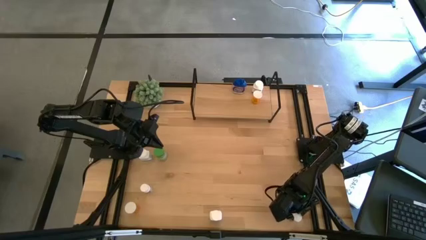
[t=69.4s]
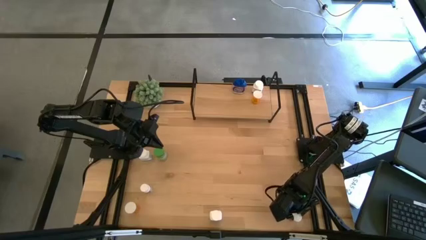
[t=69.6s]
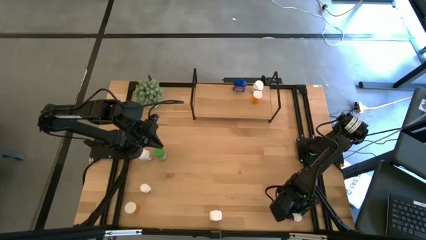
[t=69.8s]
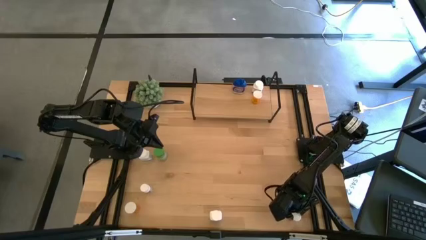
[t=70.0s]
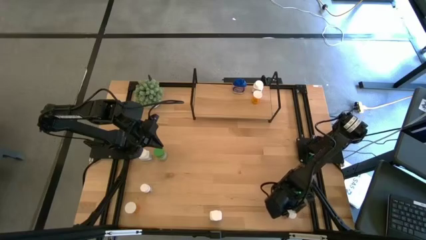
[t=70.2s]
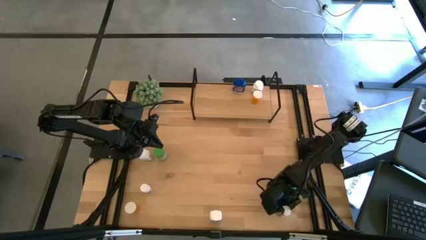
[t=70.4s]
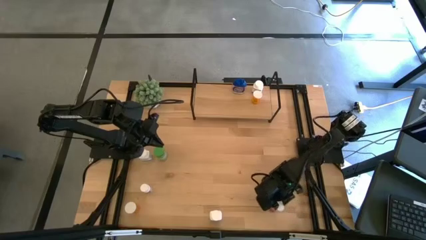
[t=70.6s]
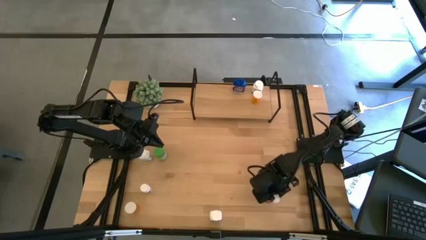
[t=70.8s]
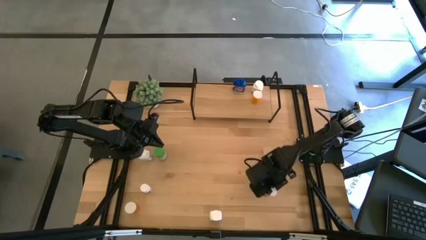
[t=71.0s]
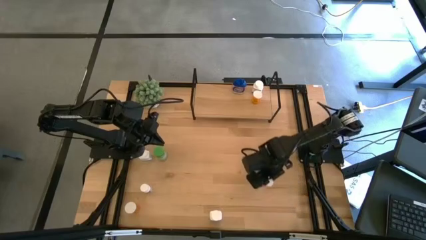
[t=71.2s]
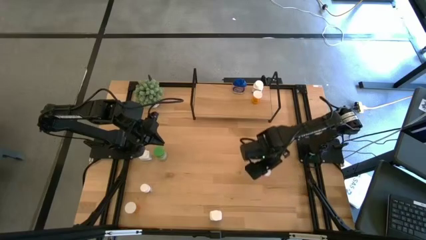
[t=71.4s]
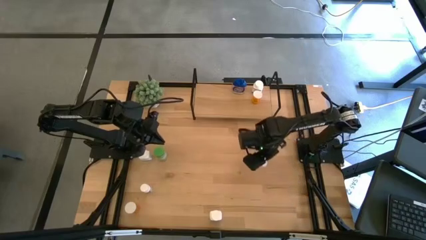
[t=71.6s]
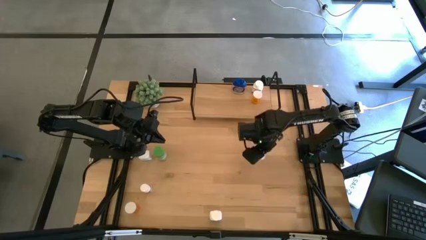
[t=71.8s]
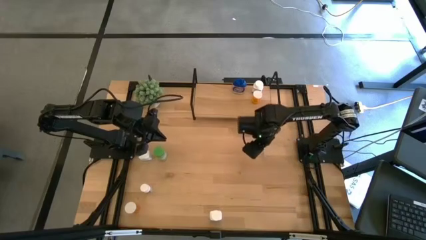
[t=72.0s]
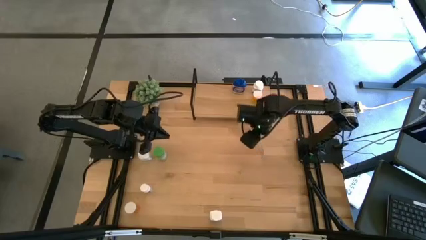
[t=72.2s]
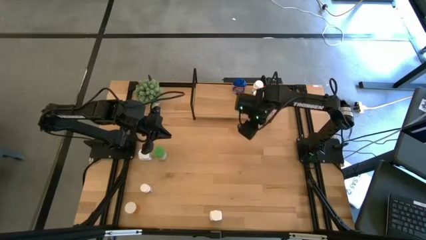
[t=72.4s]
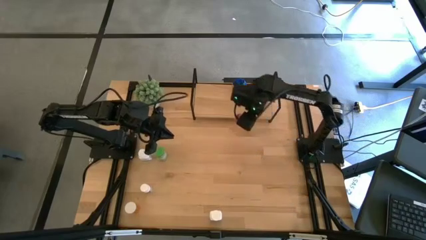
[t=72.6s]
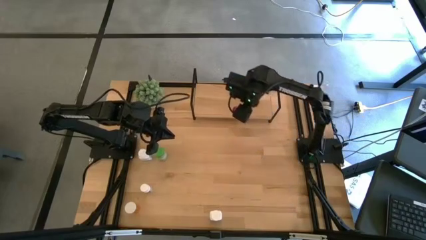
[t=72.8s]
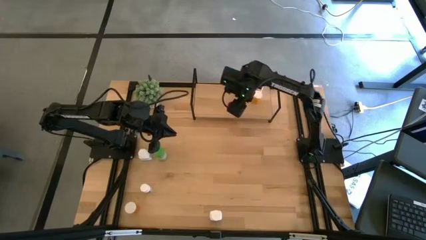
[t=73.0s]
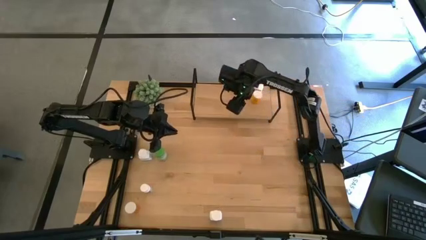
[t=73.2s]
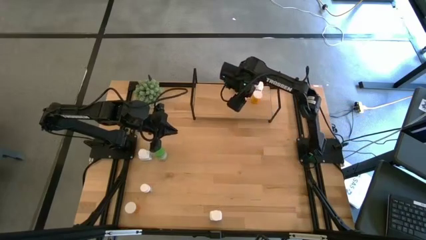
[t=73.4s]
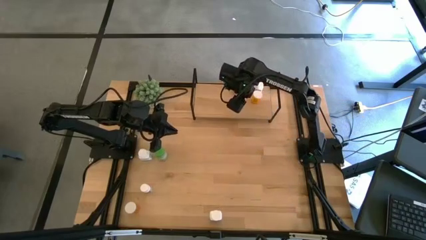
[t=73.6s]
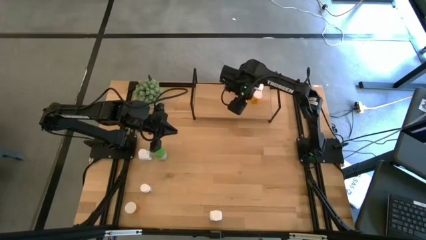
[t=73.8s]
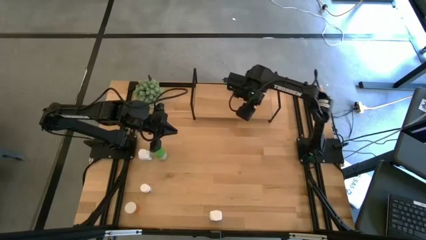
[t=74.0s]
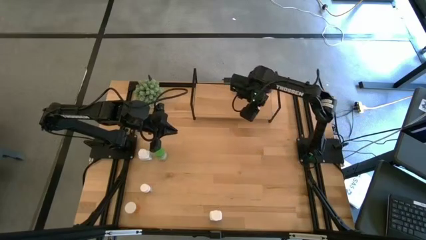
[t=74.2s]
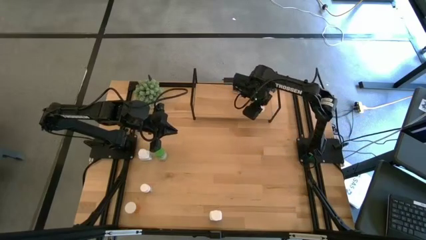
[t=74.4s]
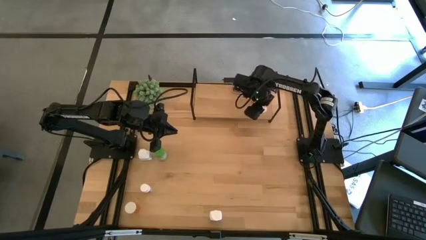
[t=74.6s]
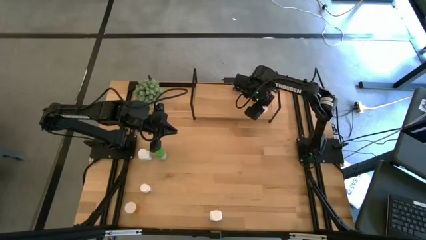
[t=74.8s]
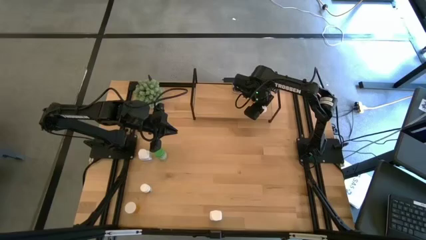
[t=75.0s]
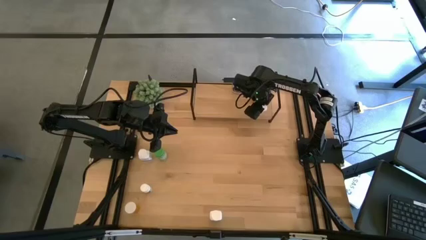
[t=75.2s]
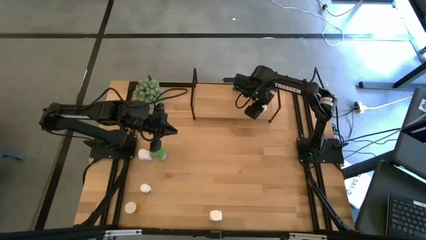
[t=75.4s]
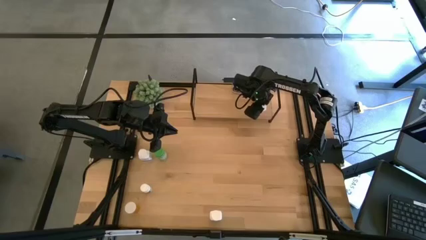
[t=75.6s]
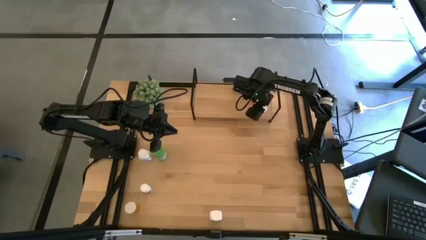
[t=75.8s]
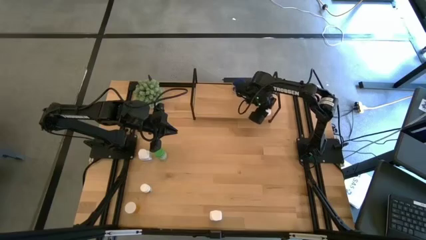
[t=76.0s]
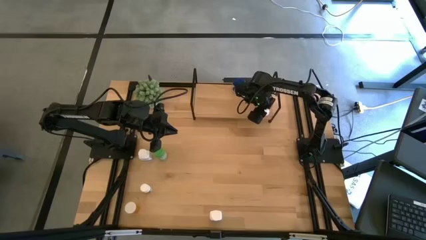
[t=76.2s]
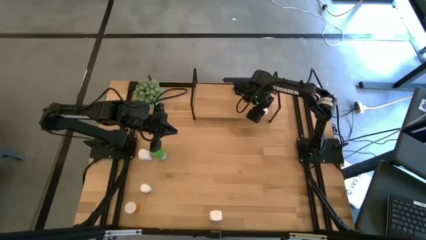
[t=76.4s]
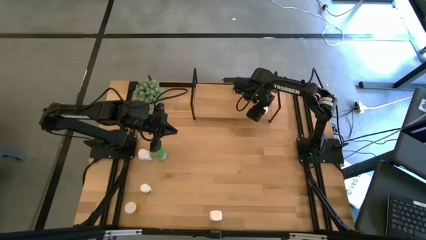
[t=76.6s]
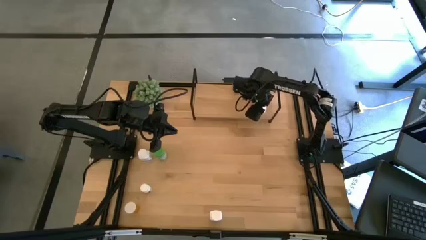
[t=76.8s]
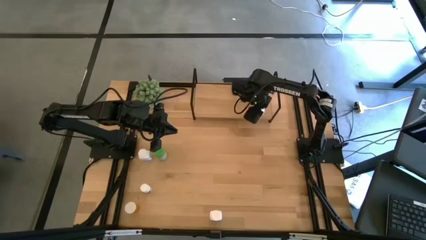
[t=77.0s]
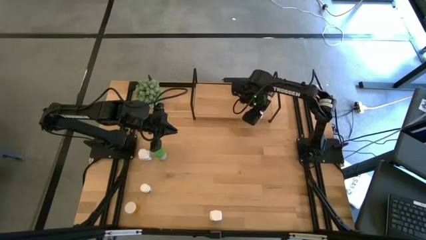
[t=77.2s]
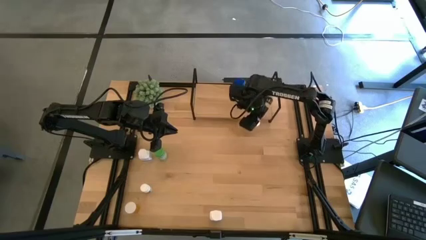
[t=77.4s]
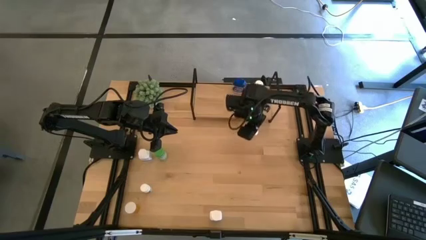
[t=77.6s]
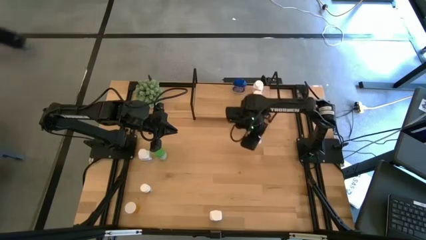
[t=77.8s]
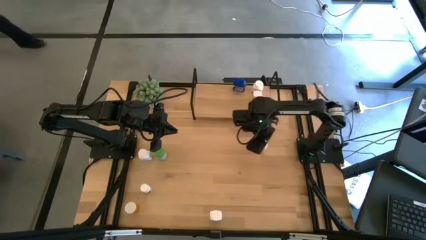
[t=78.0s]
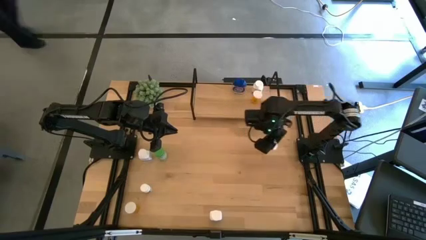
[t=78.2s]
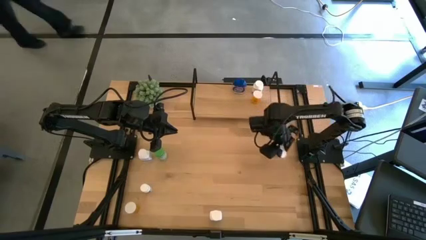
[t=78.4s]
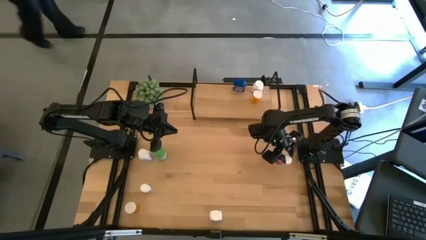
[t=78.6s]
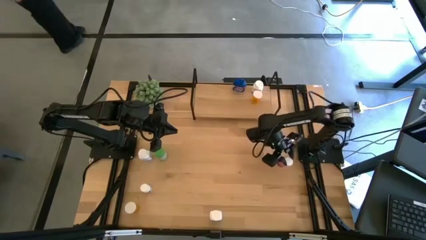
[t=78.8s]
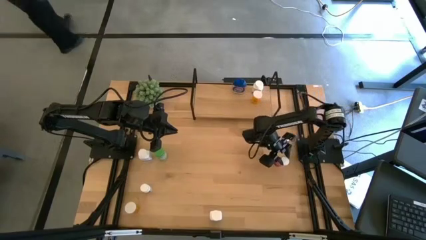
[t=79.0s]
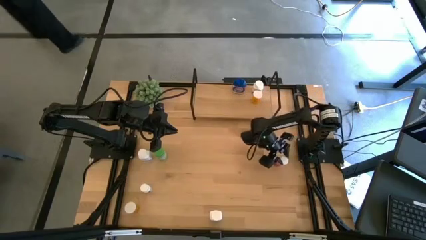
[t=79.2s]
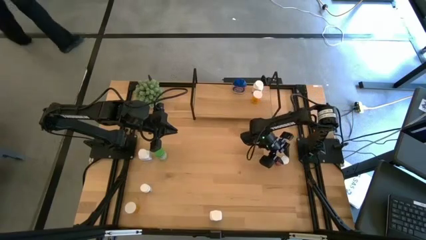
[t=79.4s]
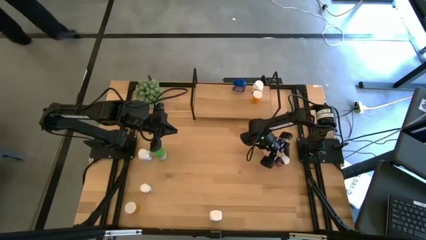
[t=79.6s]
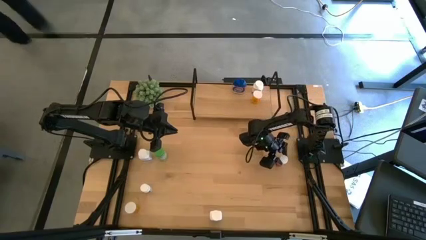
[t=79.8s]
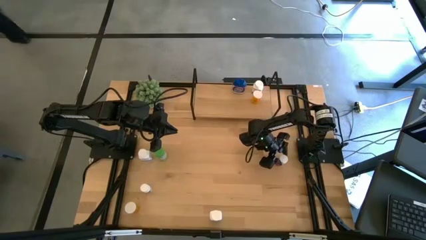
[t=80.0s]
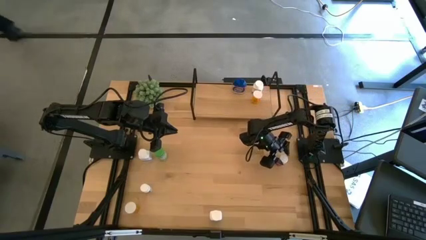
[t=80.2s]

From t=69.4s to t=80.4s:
Task: Pick and place medicine bottles onto shelf by color
Put the pink pill bottle on the shelf

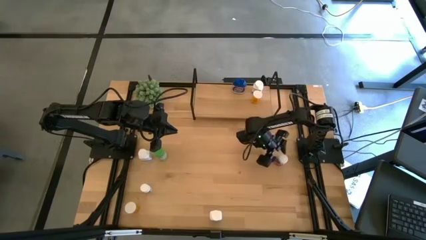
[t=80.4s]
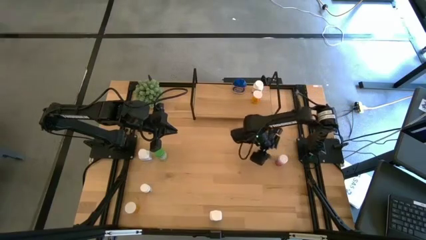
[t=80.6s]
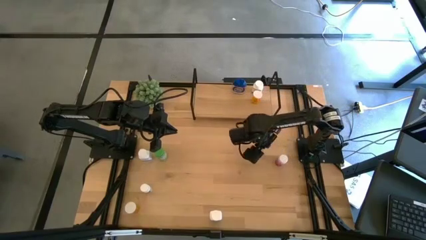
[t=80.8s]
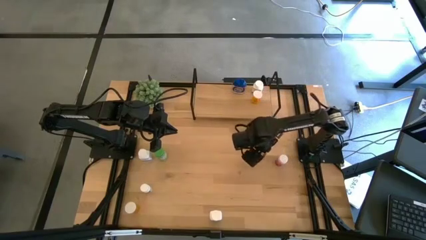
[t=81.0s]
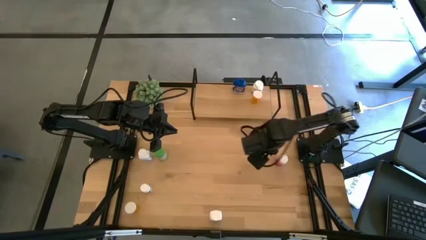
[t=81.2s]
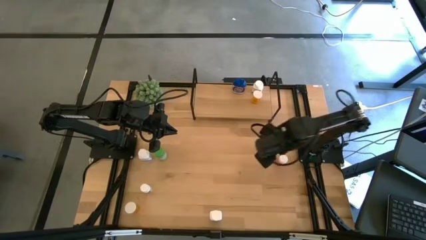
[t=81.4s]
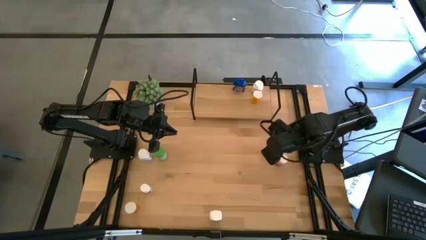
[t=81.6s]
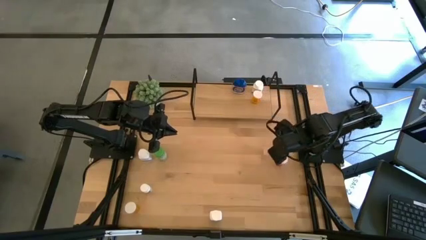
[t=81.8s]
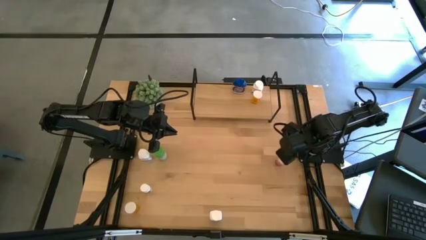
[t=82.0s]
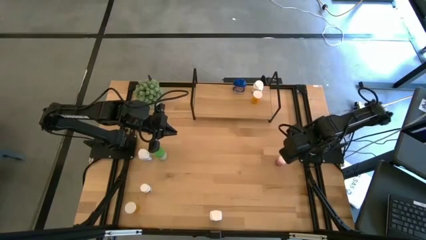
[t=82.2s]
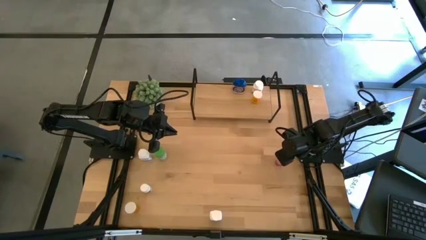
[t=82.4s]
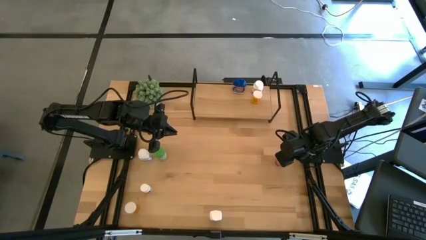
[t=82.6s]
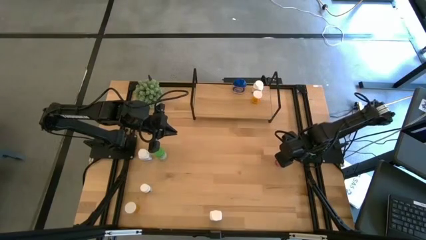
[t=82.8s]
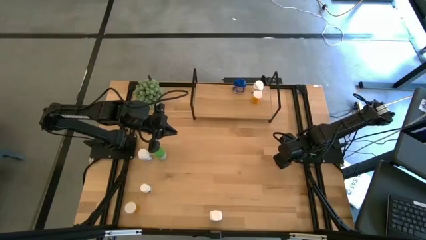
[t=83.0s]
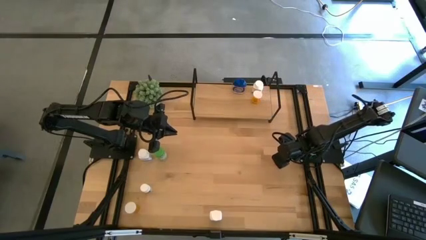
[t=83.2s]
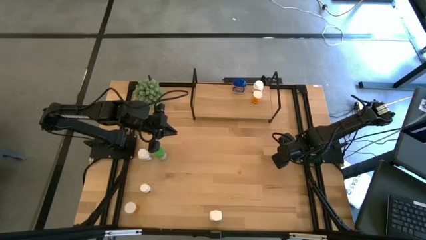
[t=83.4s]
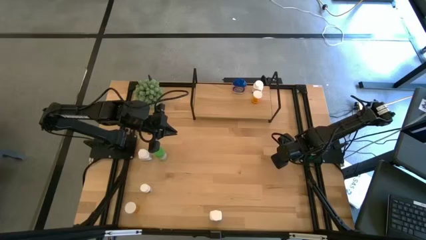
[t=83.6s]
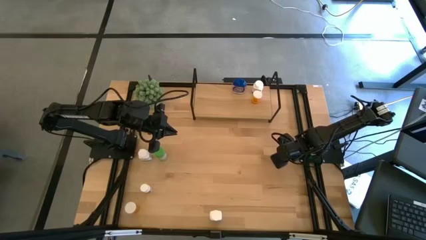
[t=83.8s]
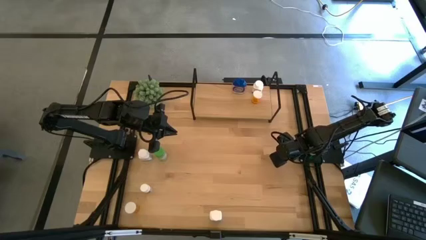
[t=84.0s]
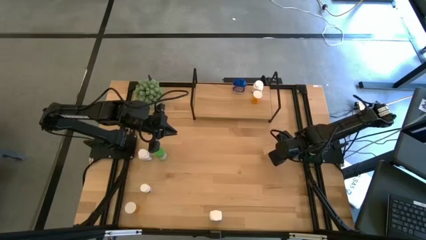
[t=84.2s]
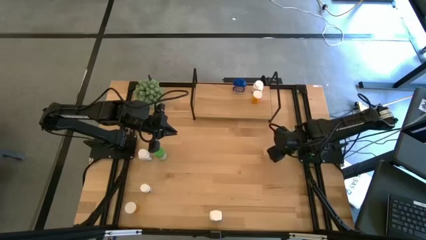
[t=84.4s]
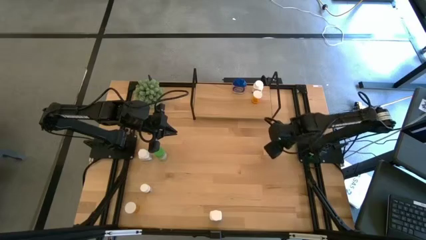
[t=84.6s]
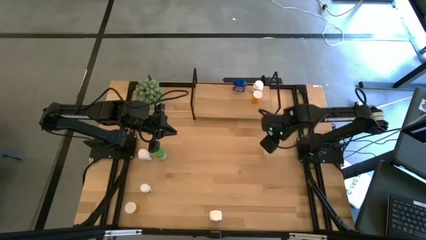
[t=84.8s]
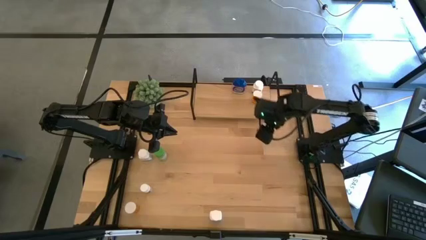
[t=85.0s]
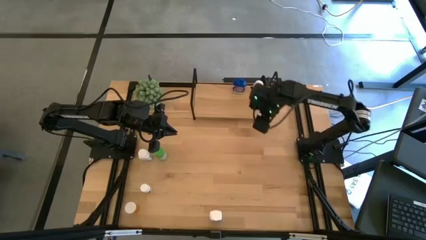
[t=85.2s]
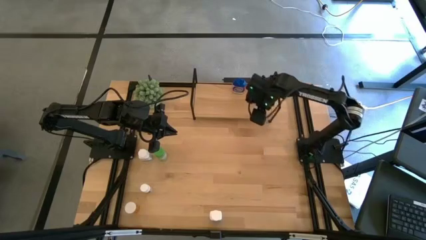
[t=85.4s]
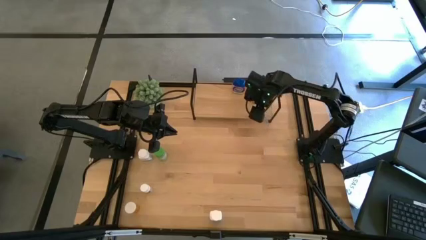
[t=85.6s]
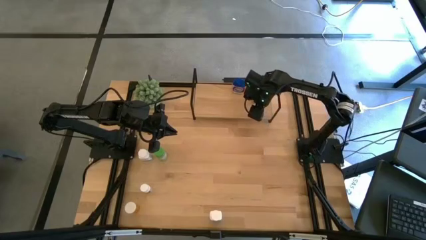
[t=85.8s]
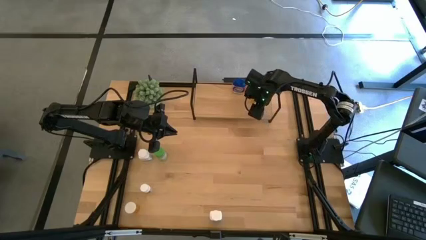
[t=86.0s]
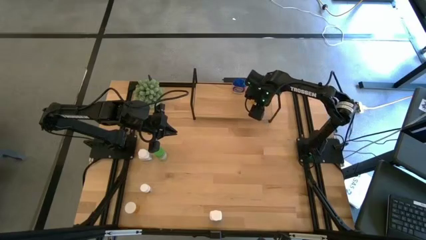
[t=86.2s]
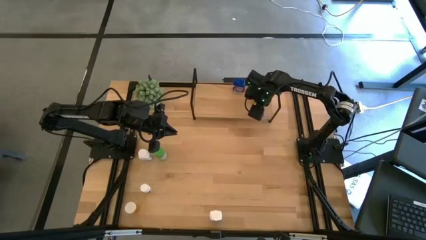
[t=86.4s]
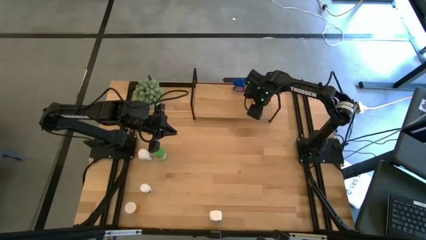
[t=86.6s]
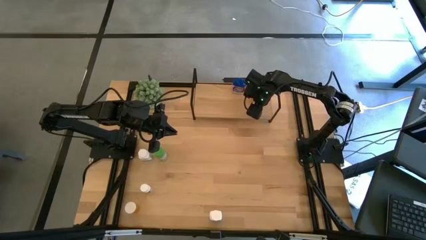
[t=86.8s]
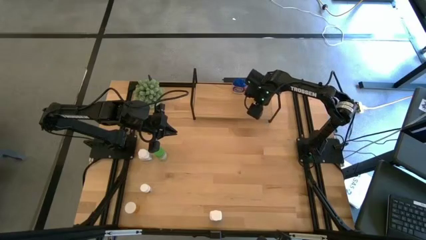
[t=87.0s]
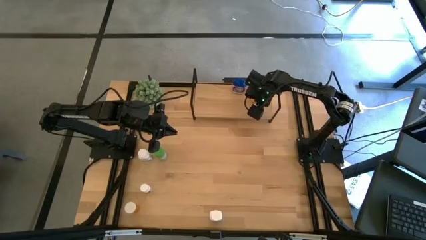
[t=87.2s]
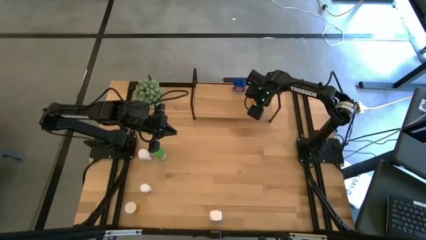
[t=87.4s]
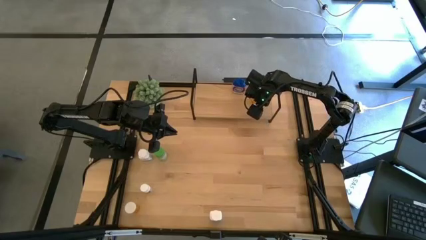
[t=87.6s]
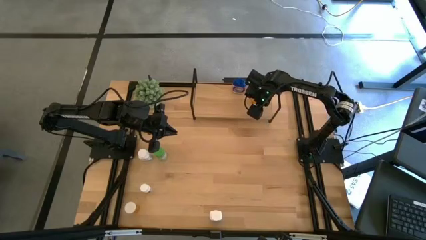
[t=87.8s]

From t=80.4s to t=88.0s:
Put the pink pill bottle on the shelf
